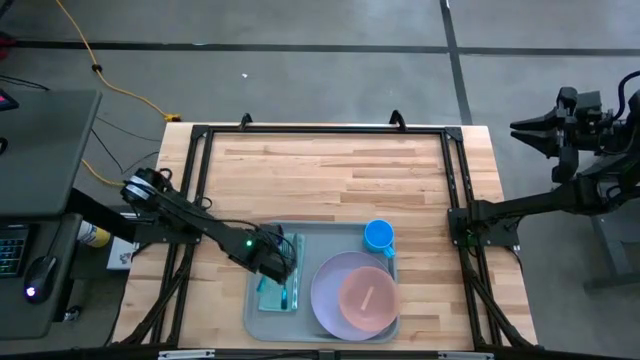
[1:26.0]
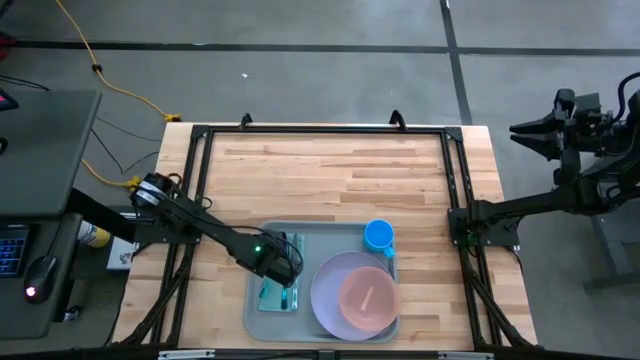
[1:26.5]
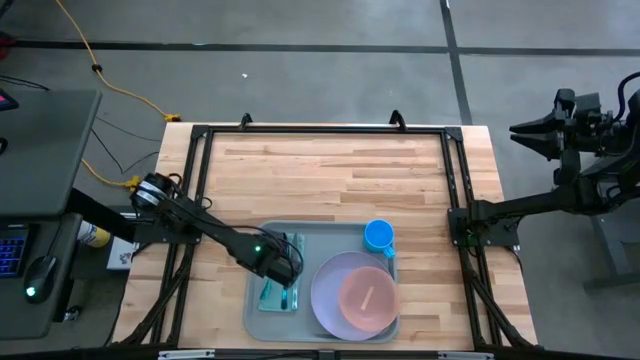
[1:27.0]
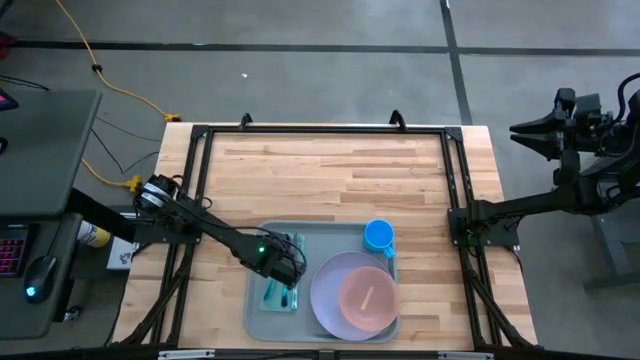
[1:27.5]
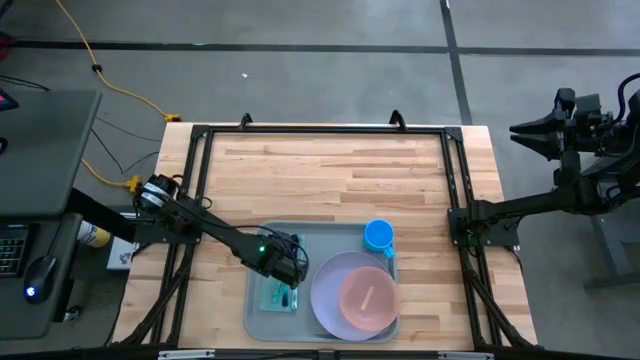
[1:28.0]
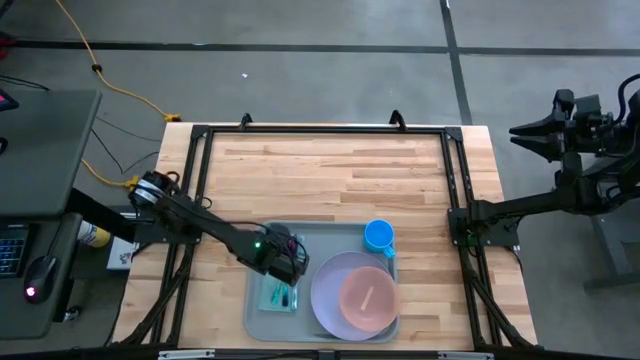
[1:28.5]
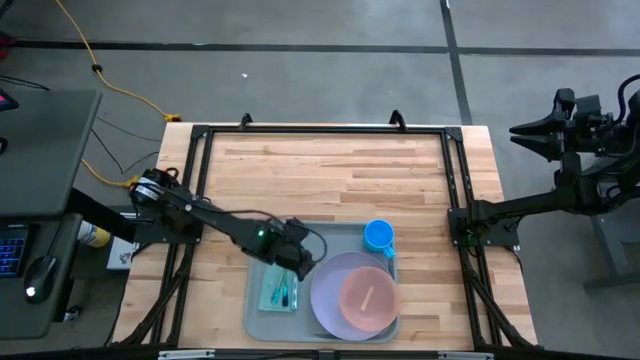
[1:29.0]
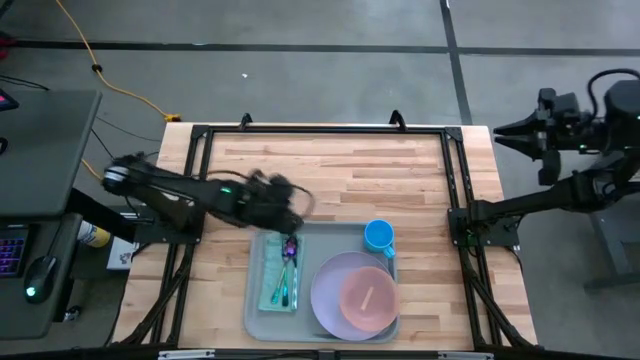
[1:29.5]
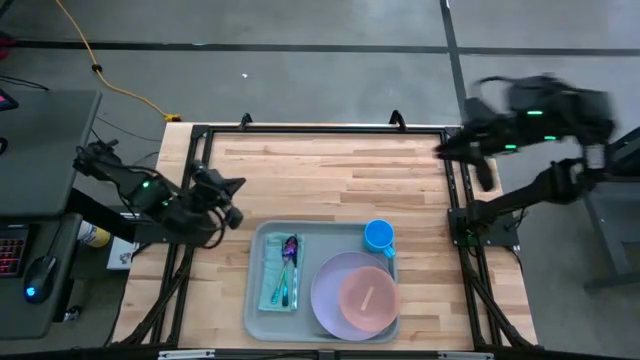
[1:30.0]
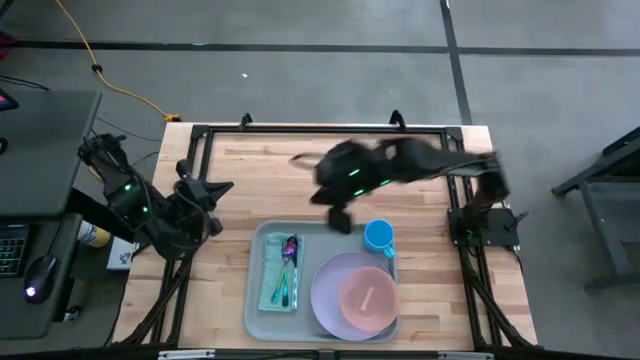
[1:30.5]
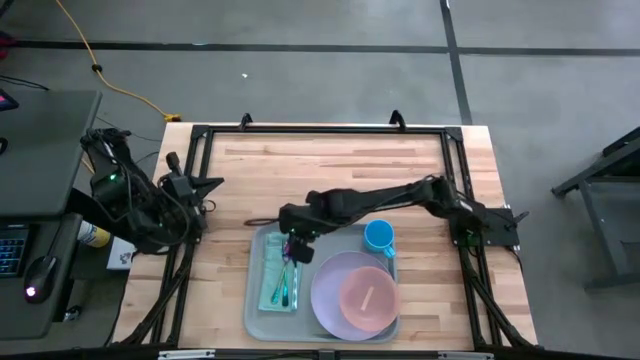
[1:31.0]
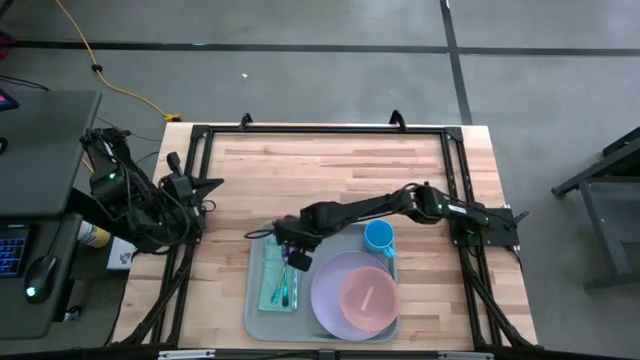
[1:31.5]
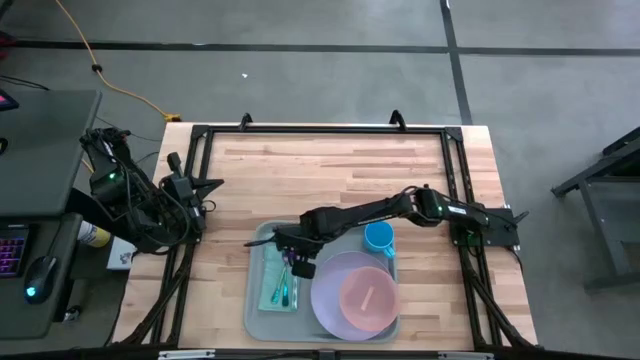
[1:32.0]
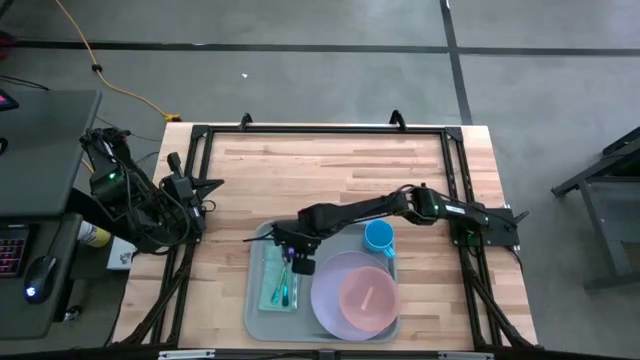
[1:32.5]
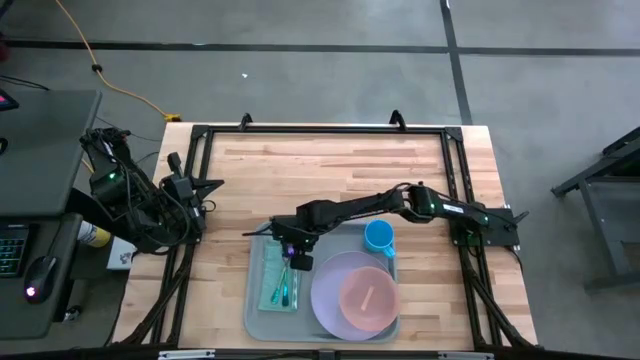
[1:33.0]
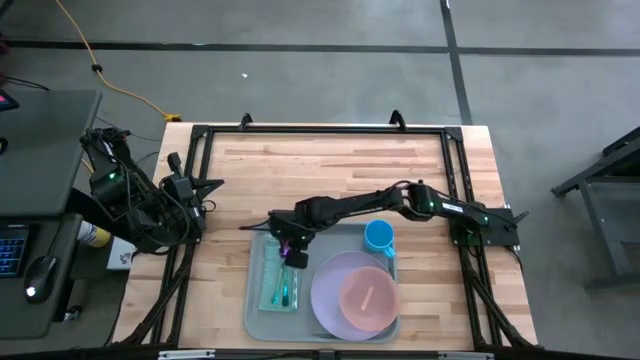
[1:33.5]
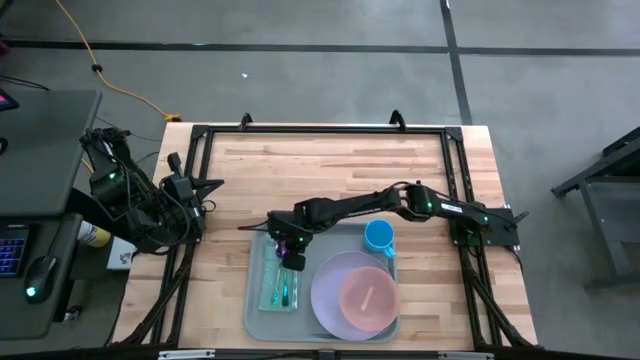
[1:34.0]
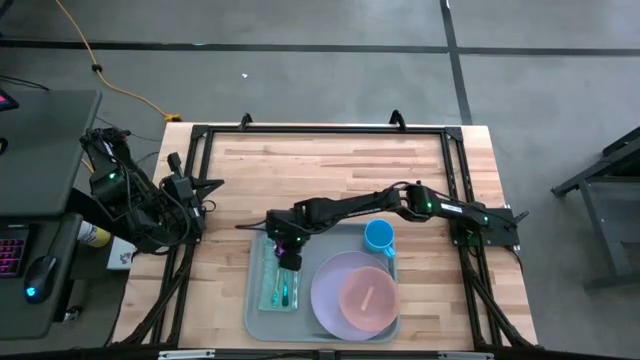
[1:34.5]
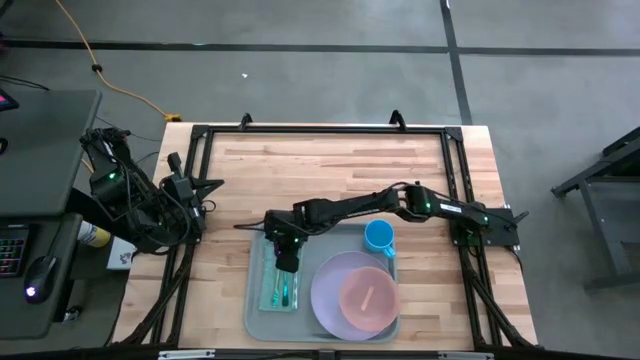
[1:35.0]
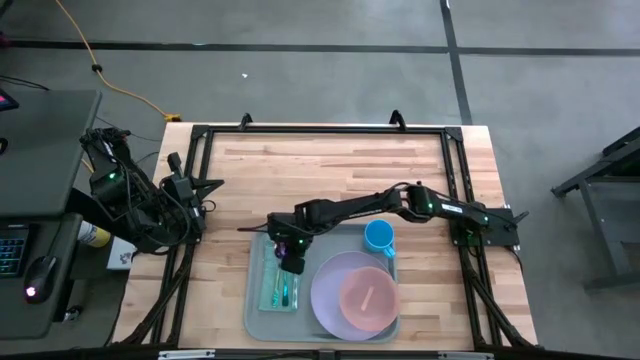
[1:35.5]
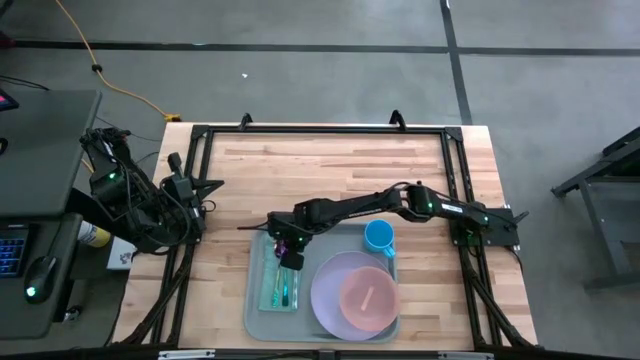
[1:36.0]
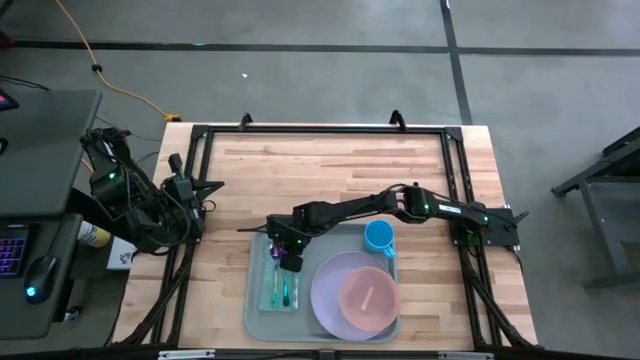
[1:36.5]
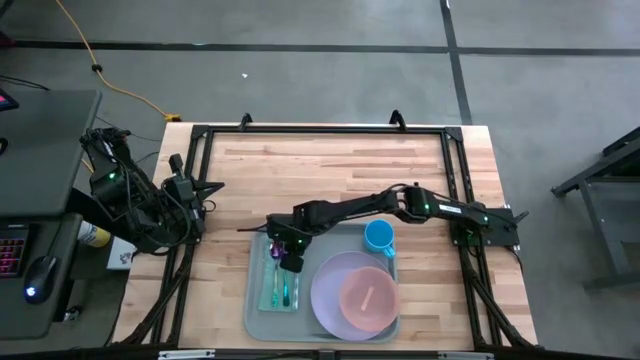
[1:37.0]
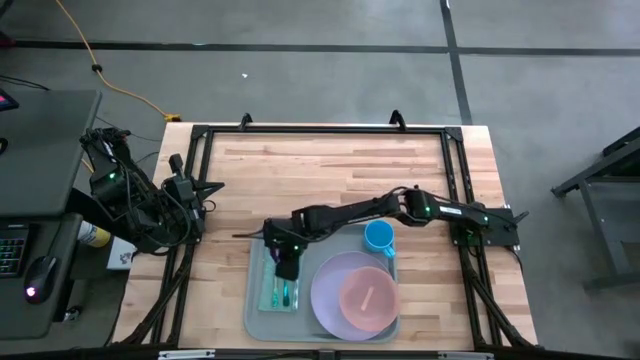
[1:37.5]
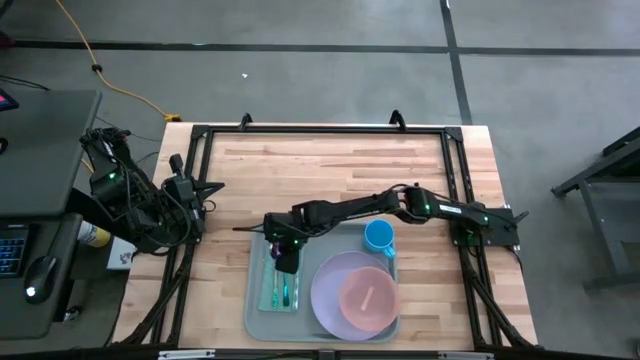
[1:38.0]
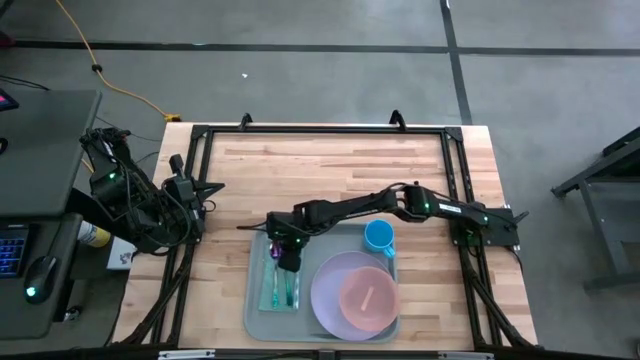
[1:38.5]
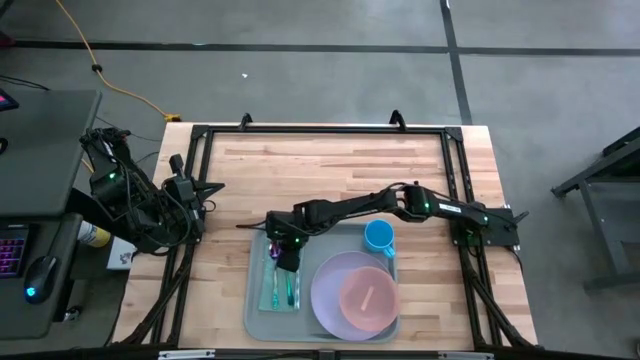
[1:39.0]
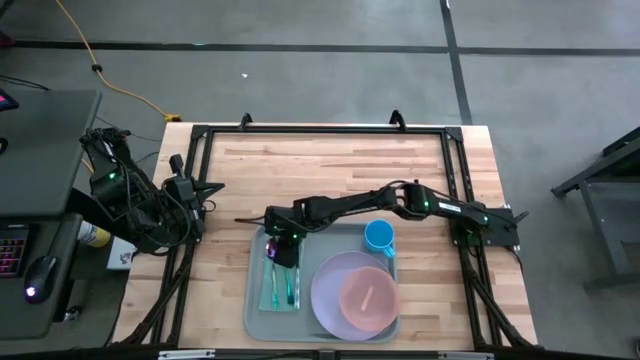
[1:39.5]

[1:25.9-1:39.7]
Task: Set up tray
Put the violet spoon on the light green table napkin to the left of the violet fork

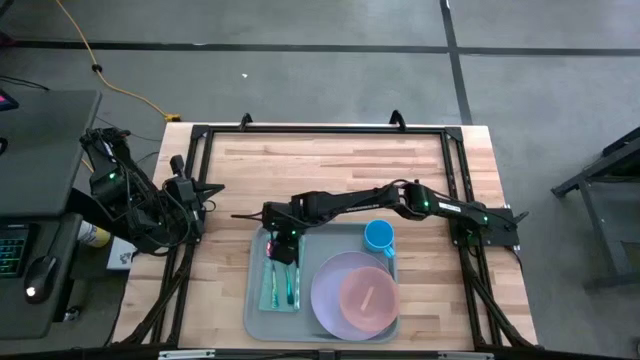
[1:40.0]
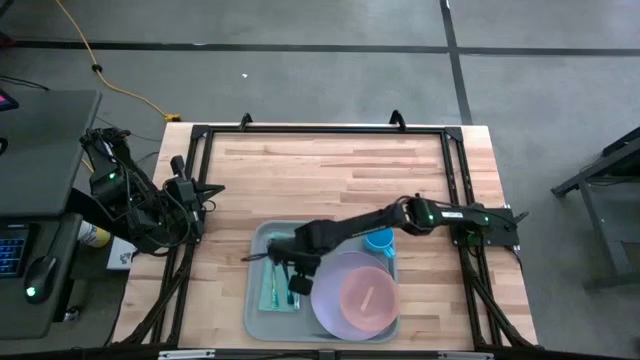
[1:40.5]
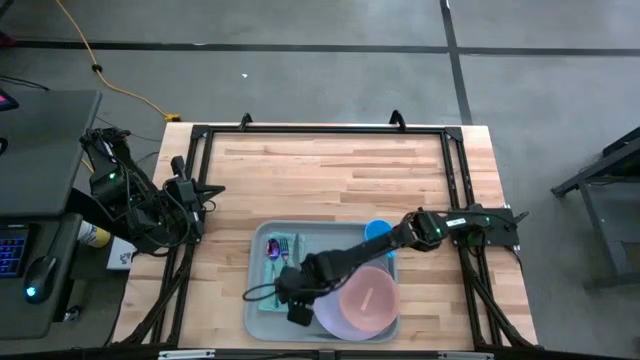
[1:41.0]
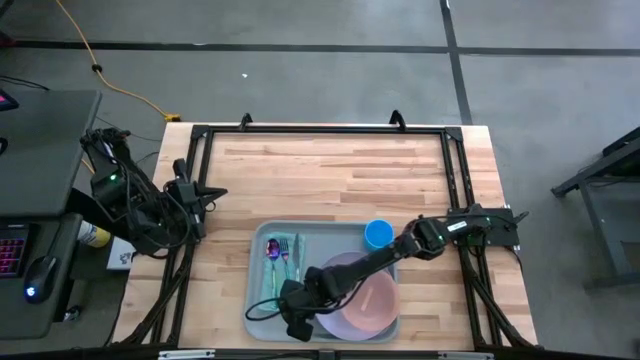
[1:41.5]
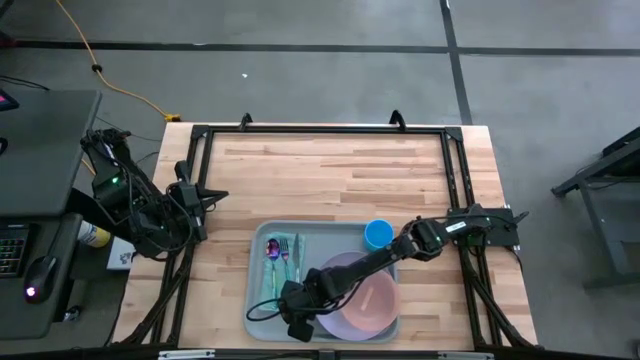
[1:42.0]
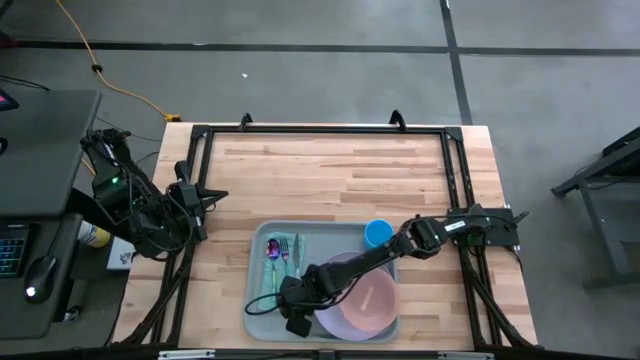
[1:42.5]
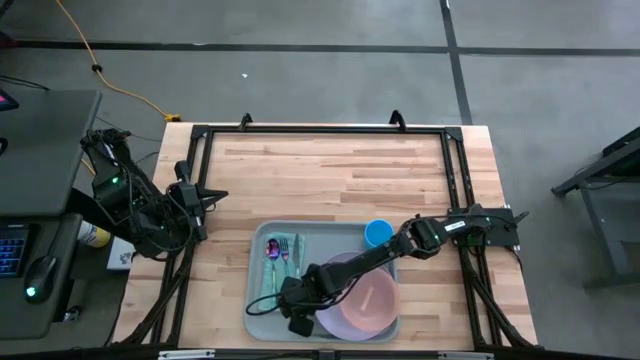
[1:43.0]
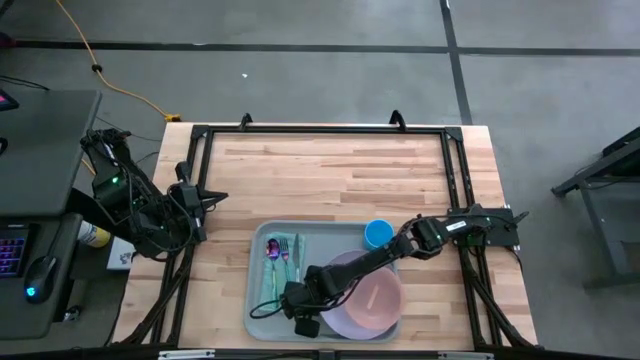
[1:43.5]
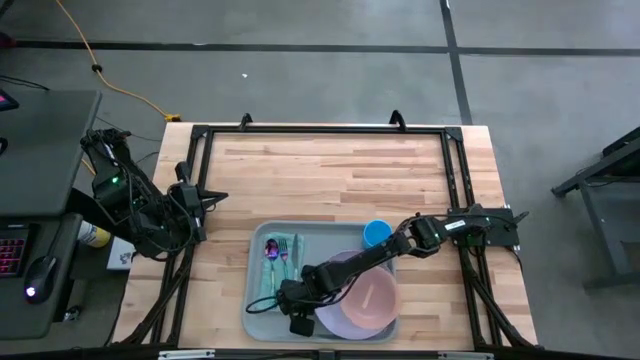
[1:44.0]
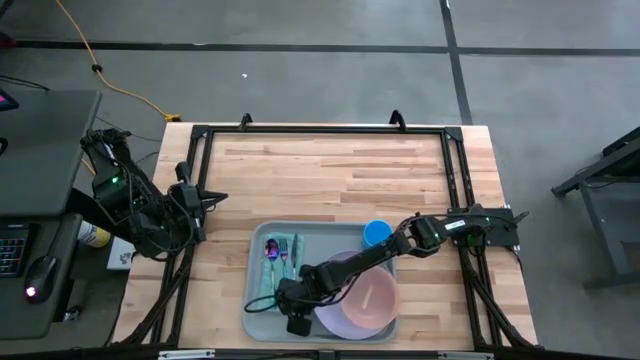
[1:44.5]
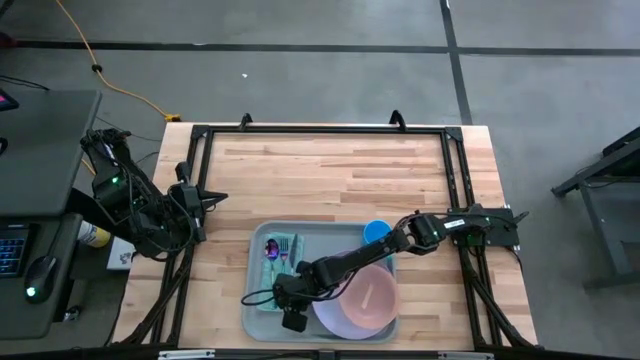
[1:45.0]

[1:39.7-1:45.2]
Adjust the green table knife on the table napkin

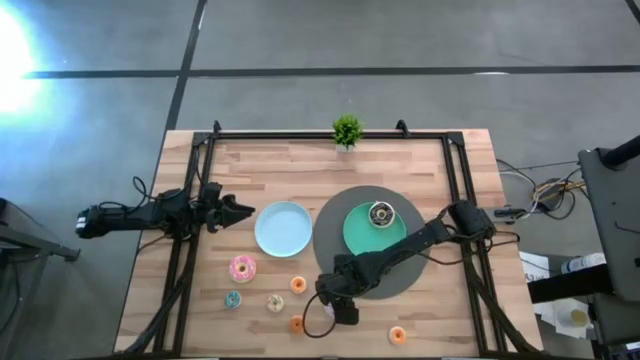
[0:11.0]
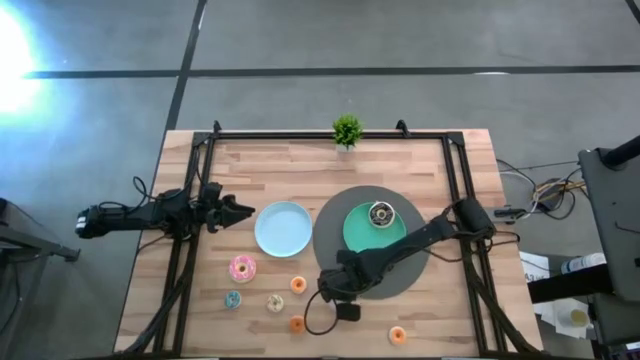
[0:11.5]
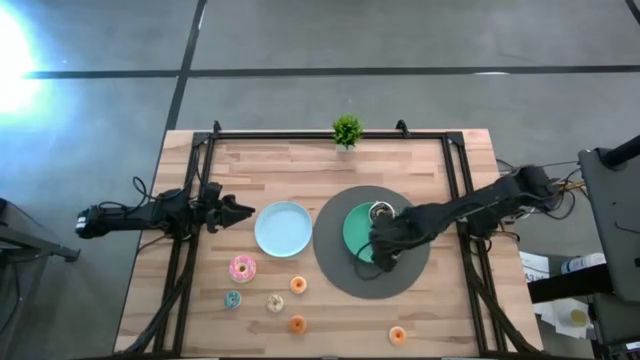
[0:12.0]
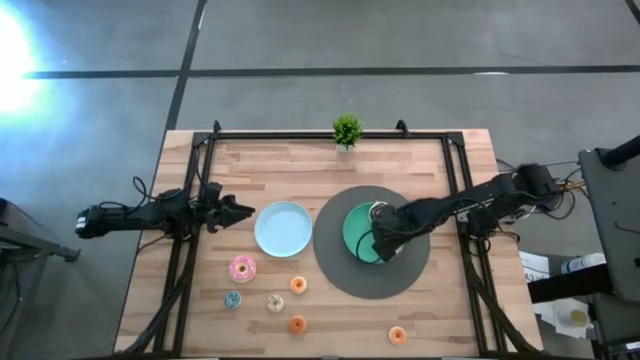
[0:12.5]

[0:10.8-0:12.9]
Task: Pick & Place donuts
Put the big white donut on the green plate
